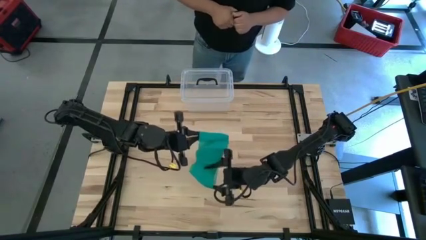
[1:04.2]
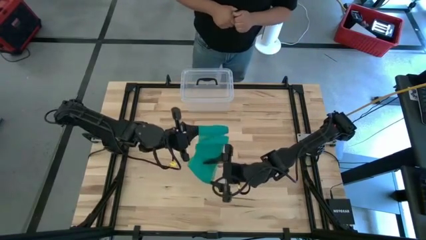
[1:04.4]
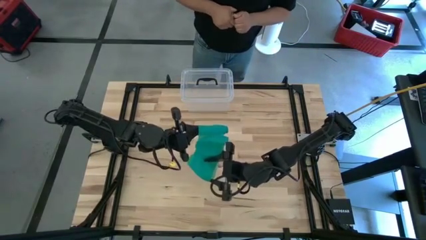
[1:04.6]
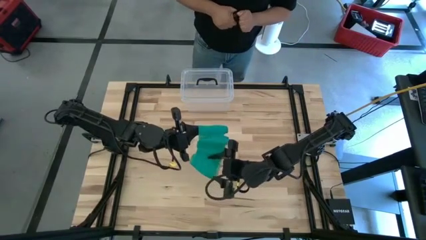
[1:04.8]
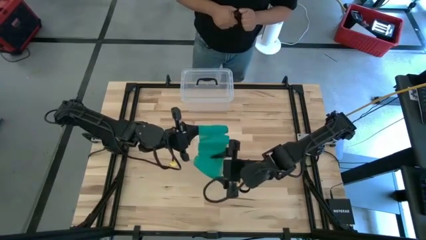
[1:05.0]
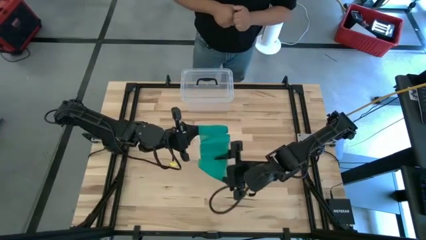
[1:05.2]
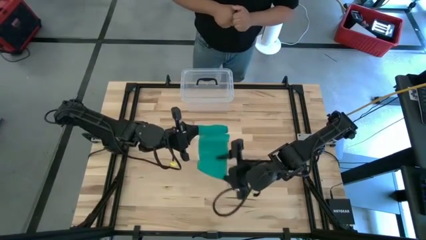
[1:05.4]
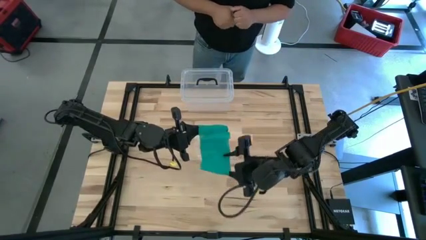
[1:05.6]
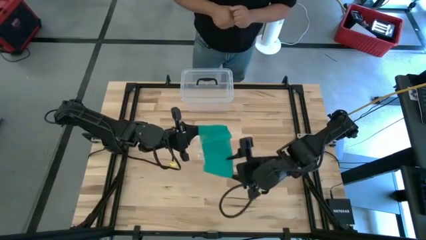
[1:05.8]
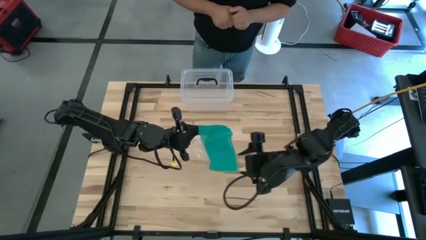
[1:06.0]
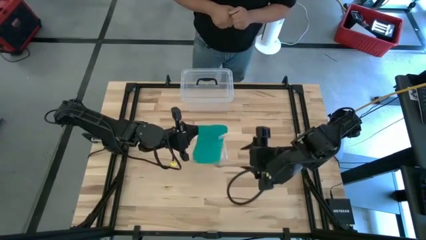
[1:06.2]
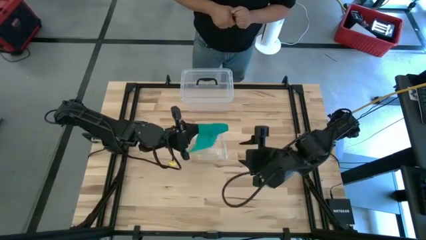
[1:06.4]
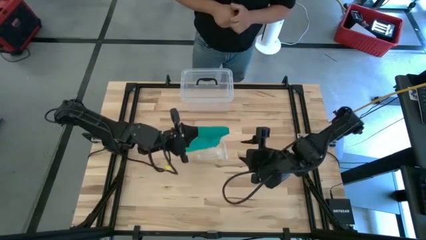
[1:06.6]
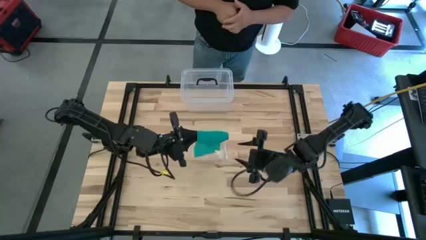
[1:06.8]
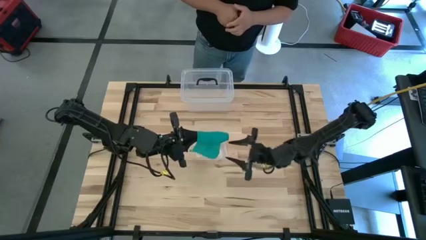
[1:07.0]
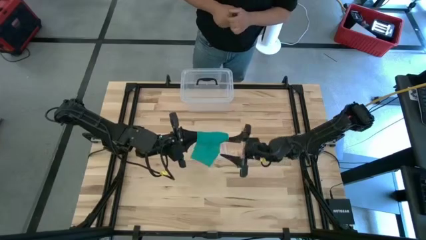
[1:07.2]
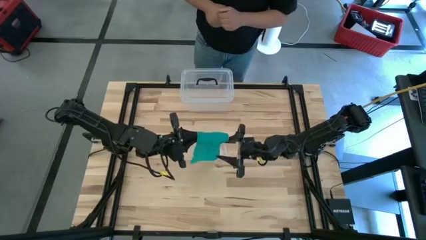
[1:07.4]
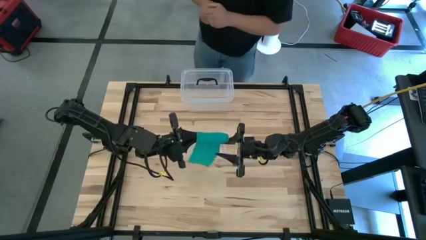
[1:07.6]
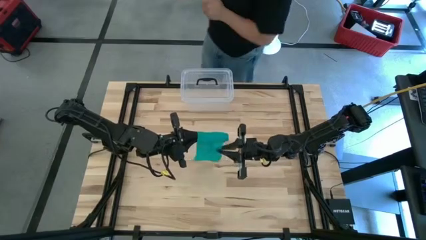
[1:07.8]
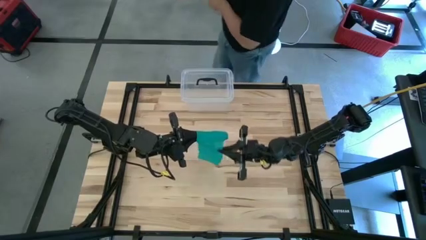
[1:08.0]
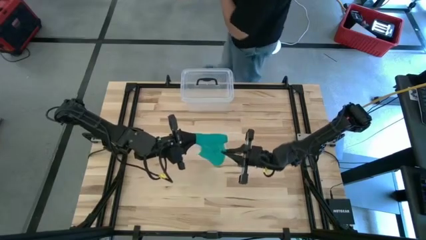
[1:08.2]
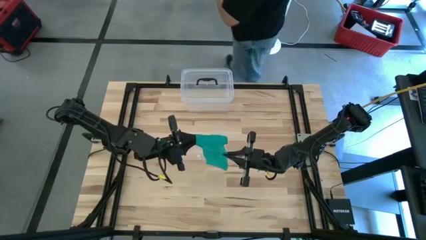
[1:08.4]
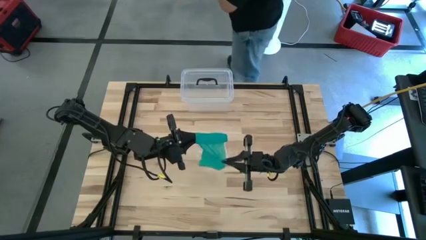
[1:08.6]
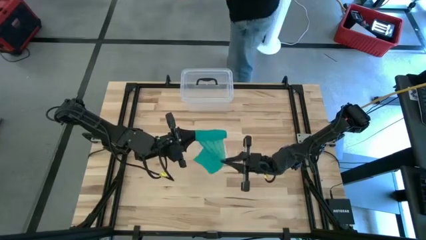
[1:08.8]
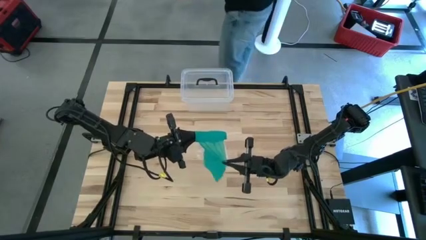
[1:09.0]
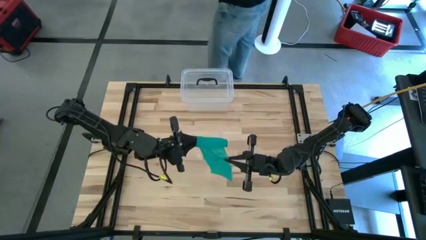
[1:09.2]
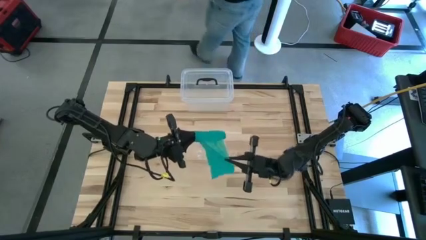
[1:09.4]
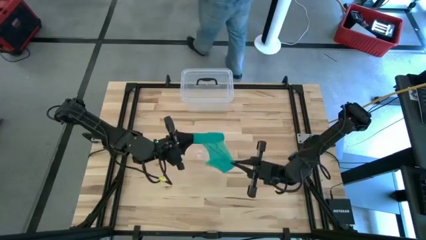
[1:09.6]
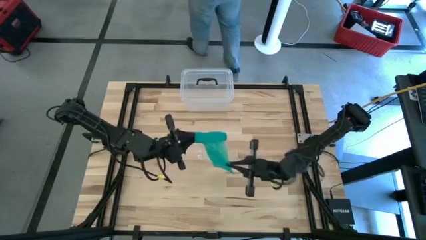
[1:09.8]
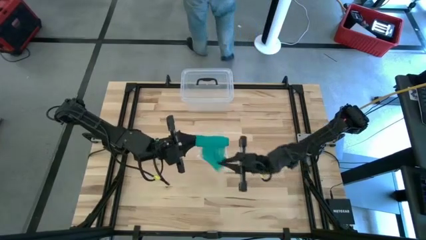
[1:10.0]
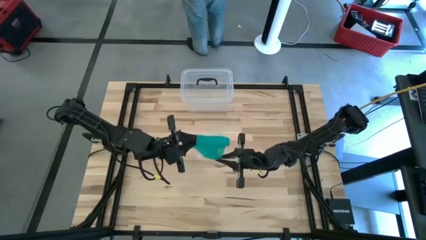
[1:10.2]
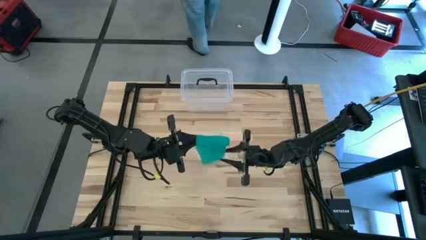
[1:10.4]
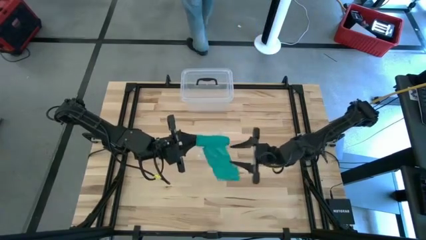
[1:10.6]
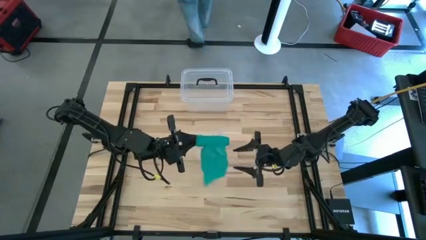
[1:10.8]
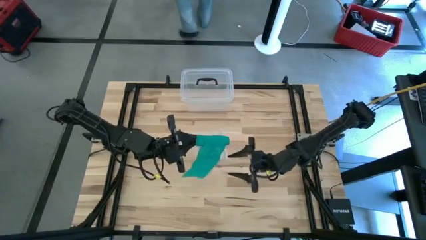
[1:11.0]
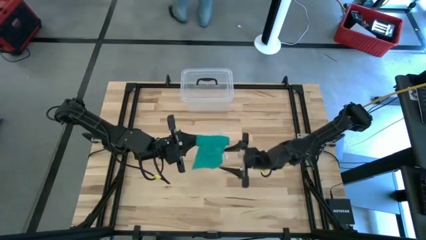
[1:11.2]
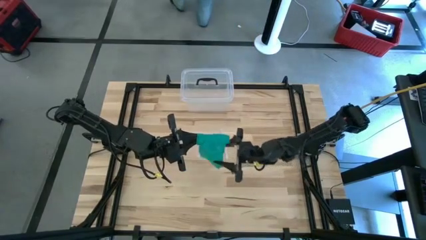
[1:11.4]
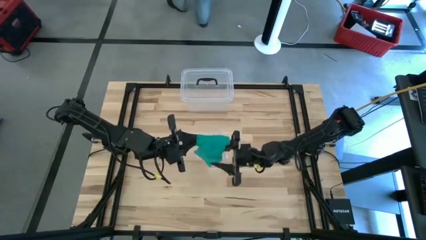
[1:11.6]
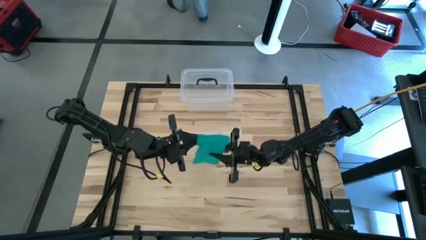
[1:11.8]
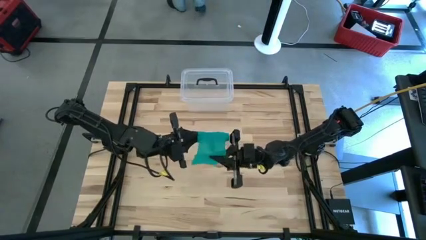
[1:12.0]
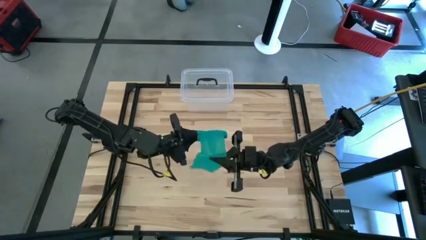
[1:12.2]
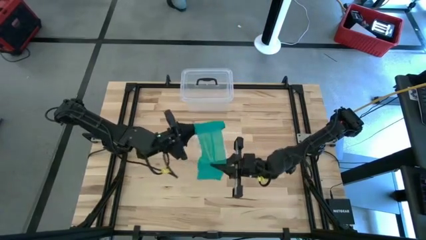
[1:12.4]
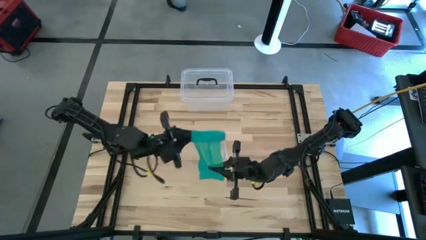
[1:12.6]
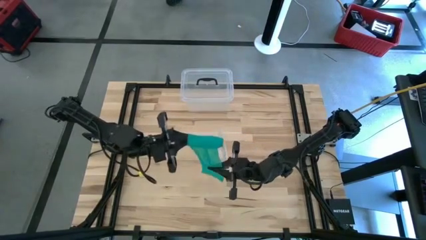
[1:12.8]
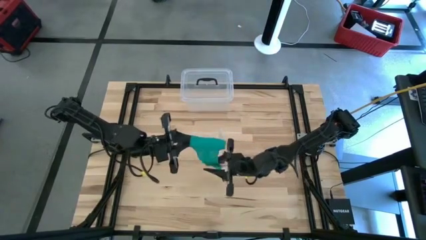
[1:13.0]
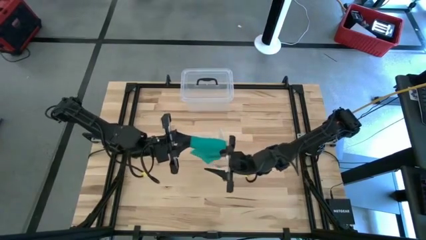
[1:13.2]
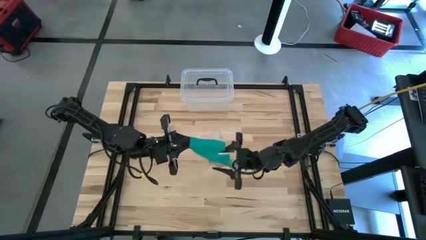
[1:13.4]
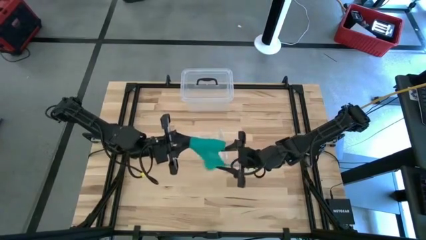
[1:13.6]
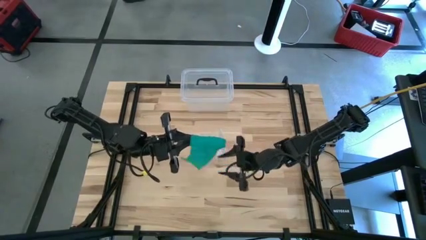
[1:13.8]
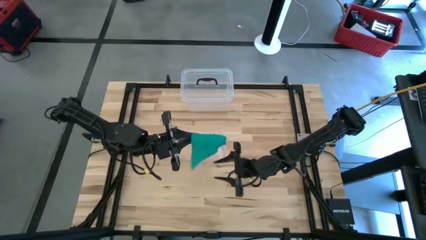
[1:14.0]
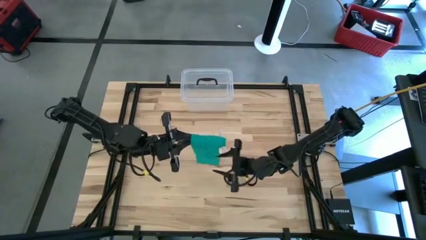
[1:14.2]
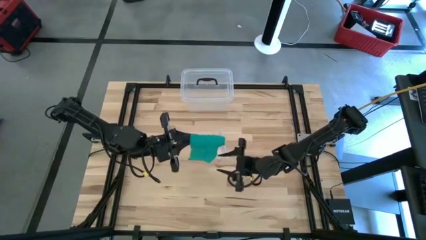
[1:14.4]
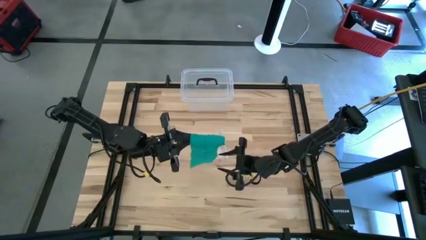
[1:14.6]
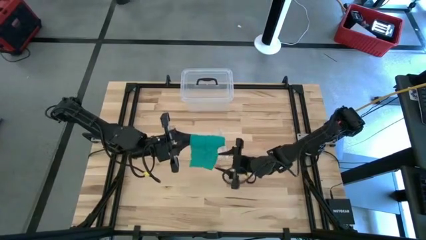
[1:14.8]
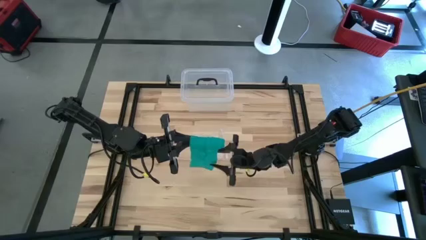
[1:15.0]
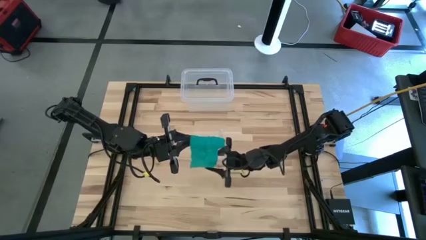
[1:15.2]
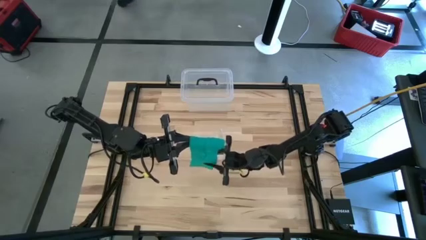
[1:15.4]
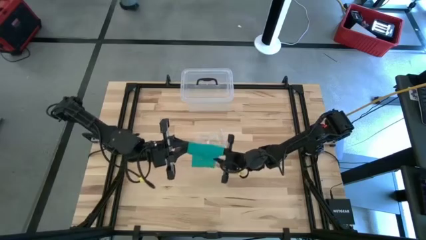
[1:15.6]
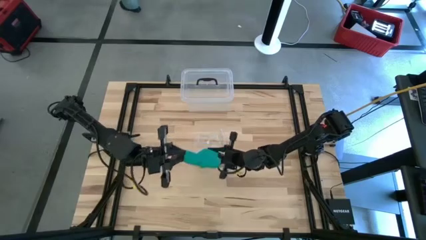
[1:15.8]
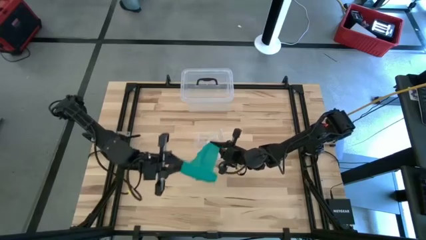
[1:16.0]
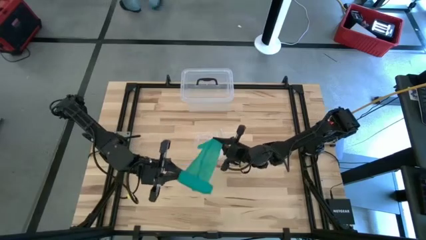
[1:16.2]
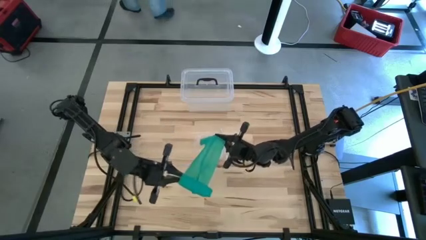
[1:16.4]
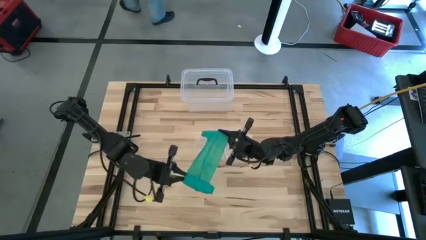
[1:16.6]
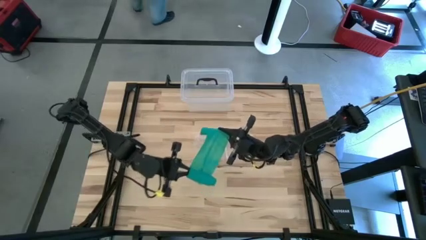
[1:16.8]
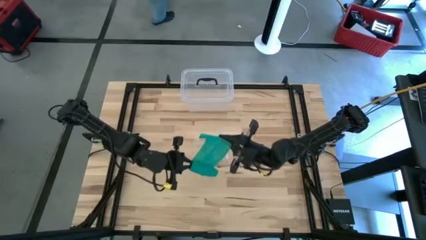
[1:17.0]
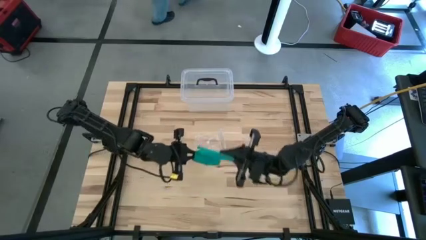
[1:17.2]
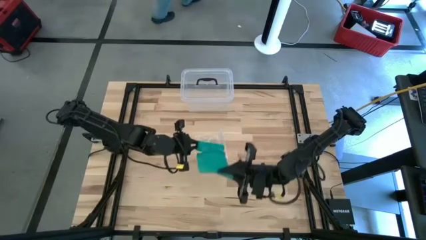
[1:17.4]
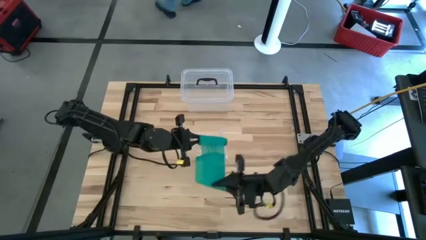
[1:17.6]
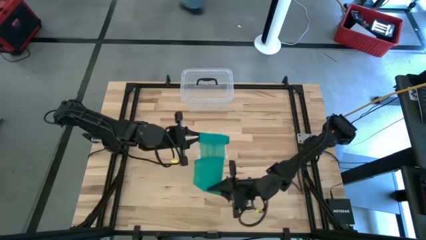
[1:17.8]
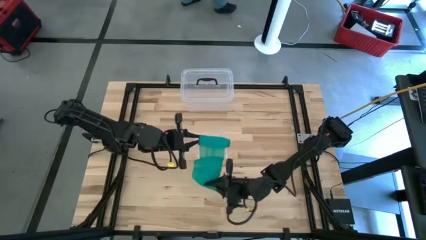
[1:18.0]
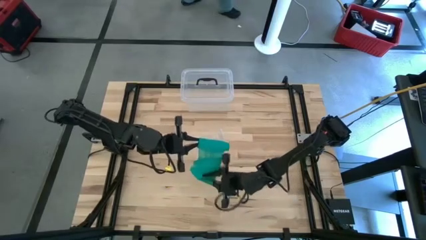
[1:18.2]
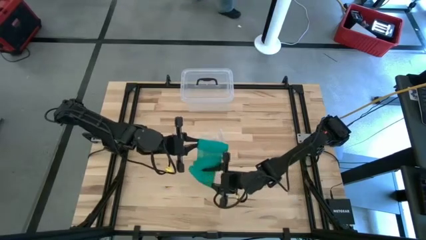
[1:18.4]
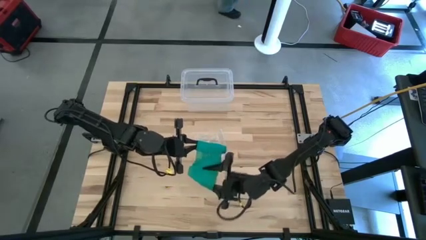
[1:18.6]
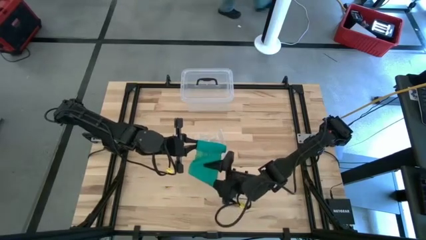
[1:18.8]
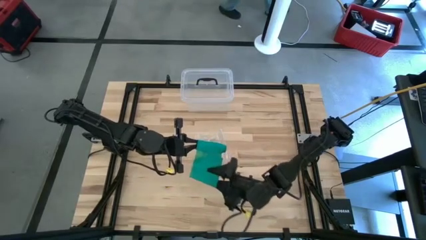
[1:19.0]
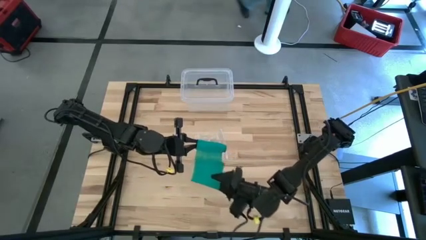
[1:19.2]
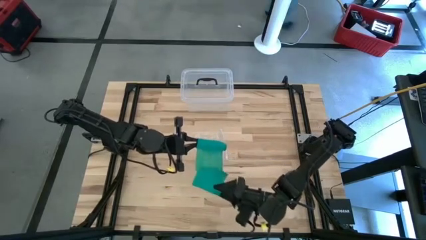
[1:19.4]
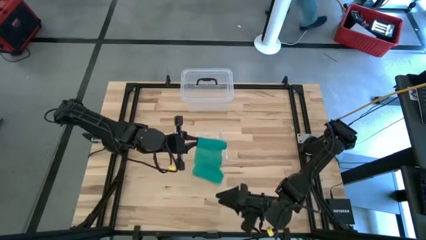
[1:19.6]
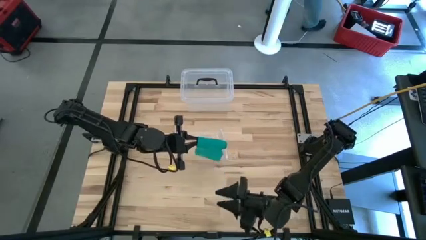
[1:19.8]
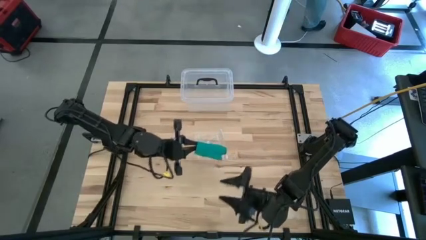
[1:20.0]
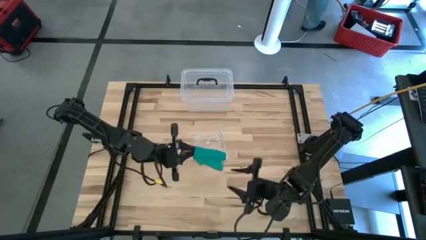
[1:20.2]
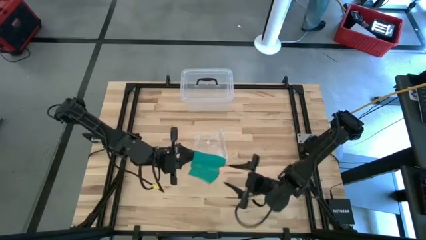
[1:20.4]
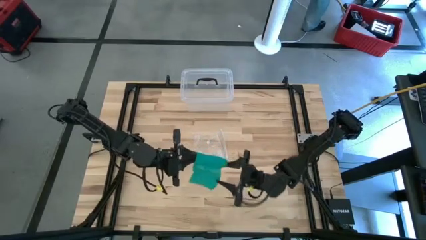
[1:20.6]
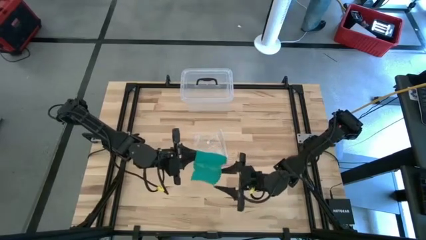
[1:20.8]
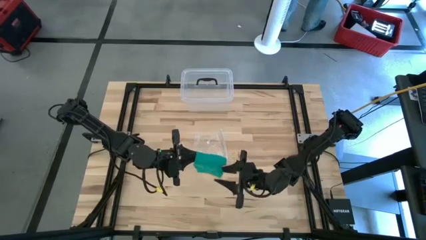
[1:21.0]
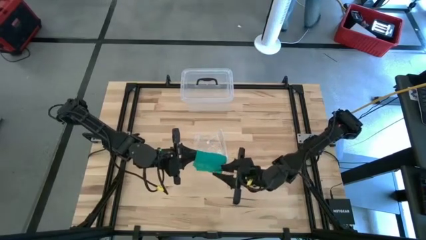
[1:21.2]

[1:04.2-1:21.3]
Task: Roll bandage
Roll the green bandage
